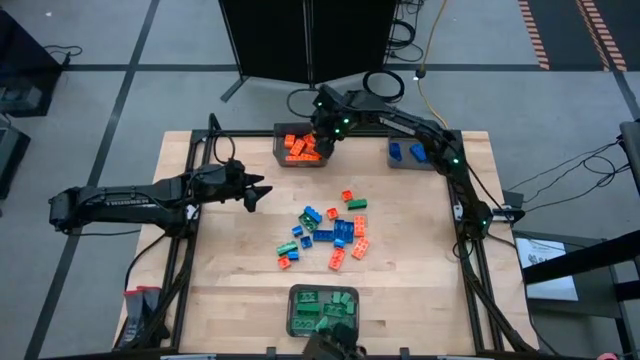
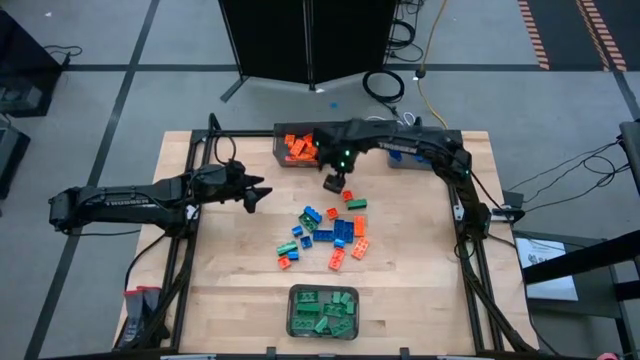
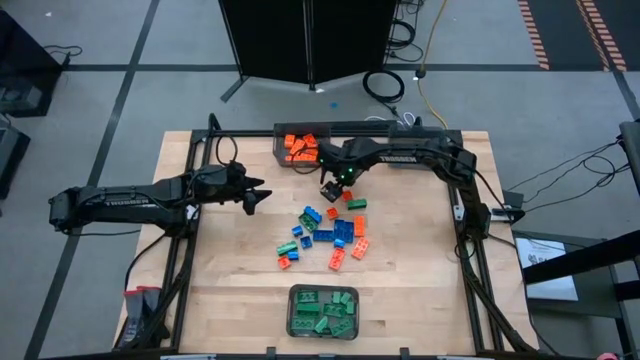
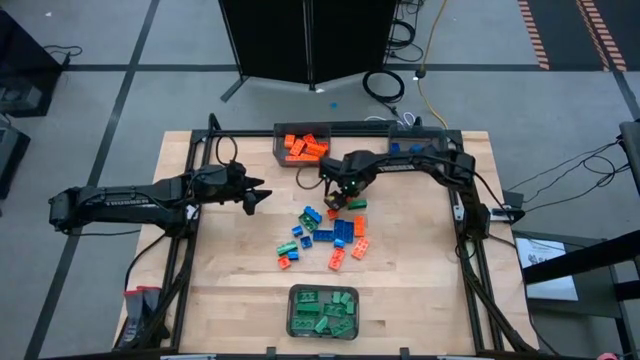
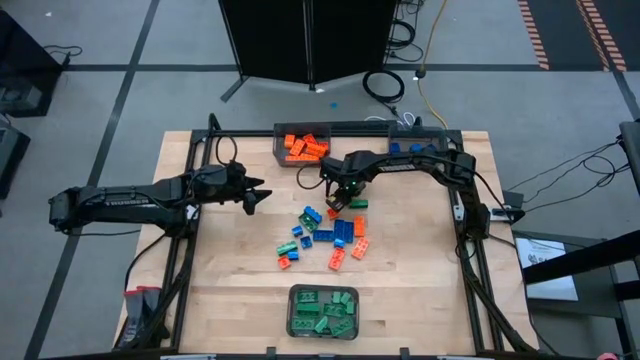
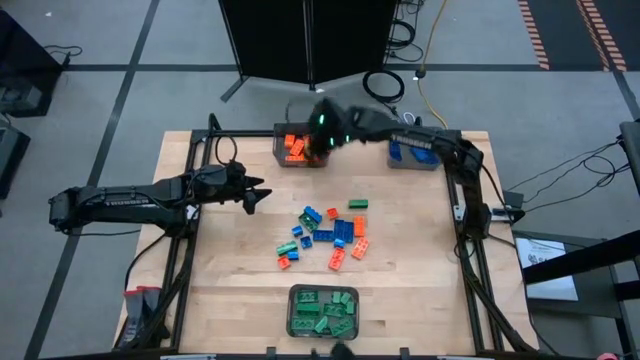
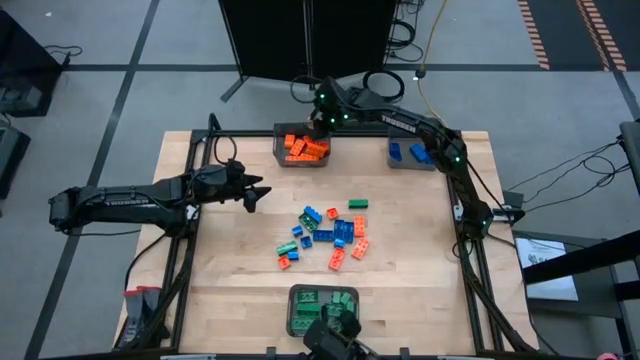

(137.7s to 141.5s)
Task: Sort blocks
Put the orange game piece into the top left black bin

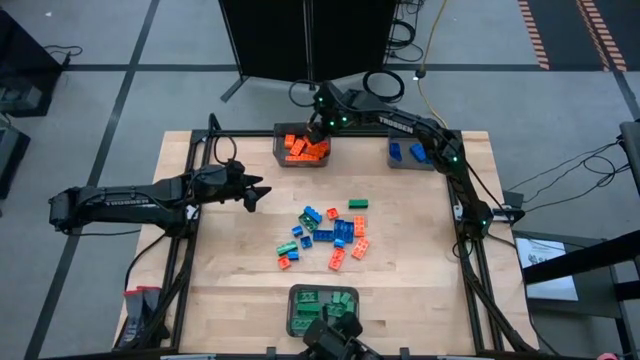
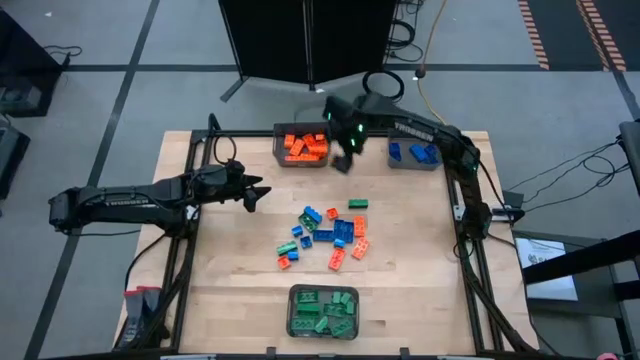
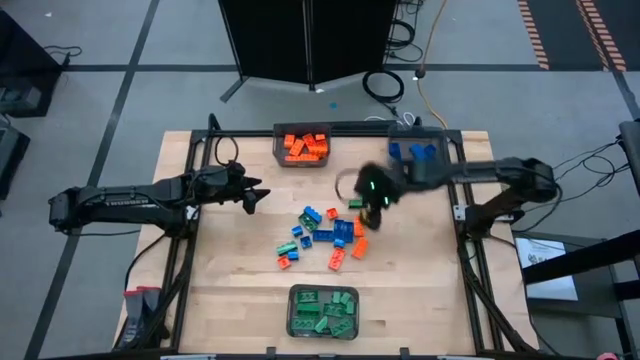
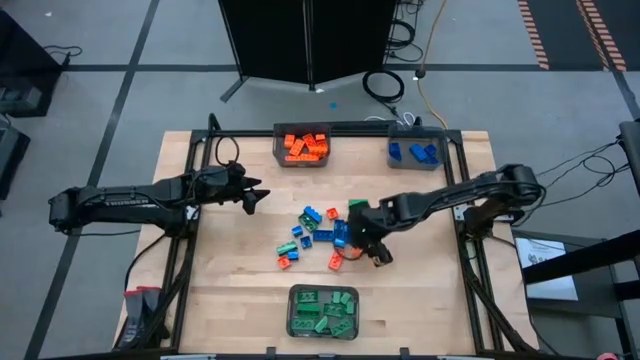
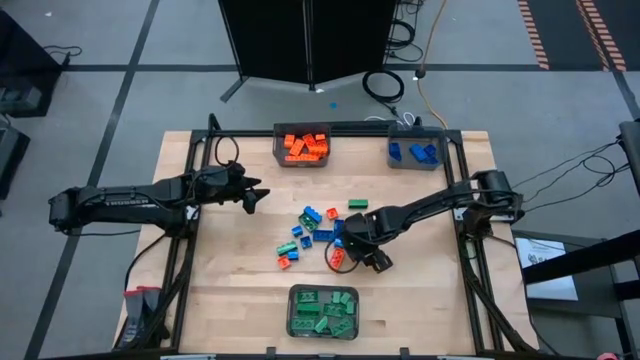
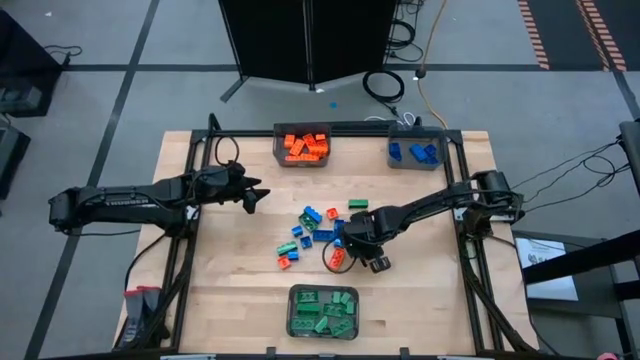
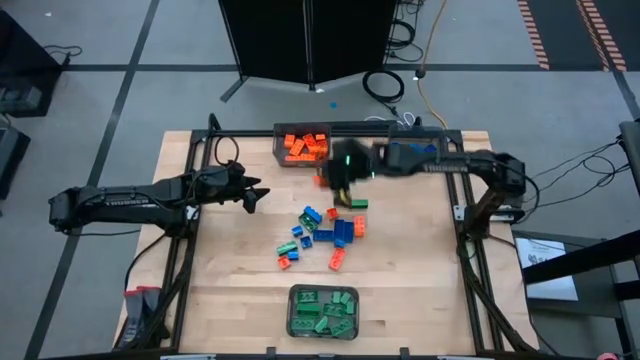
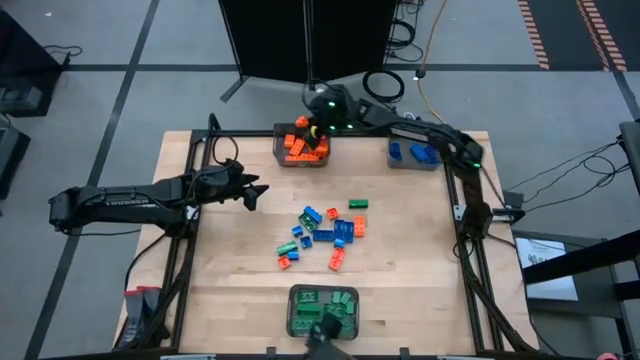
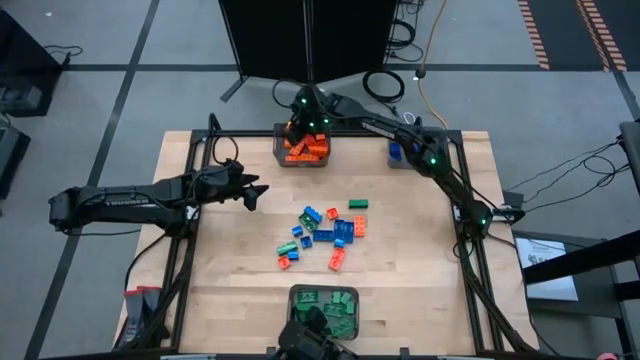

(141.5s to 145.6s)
Put the orange game piece into the top left black bin

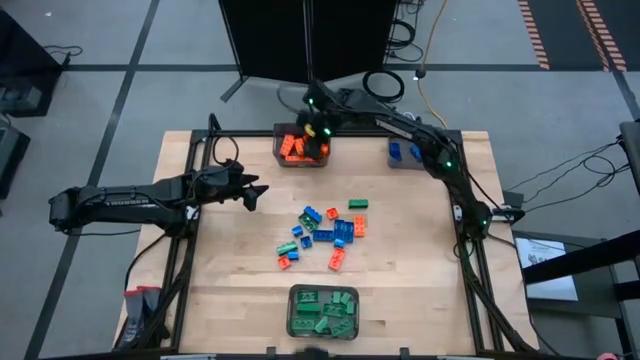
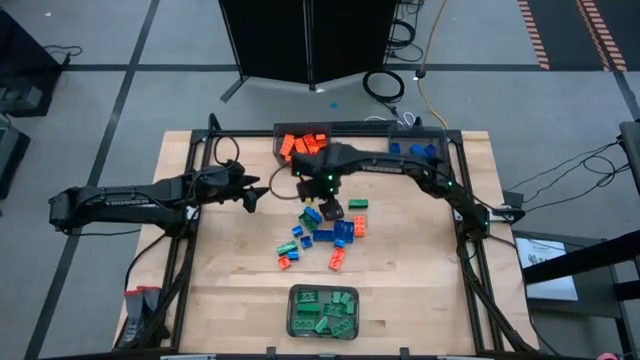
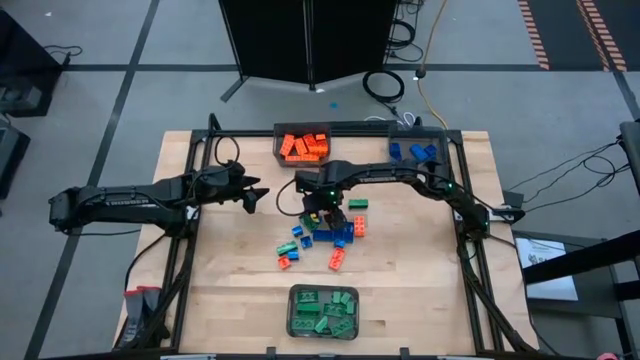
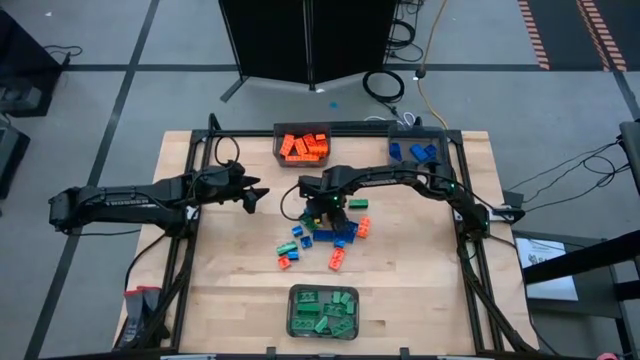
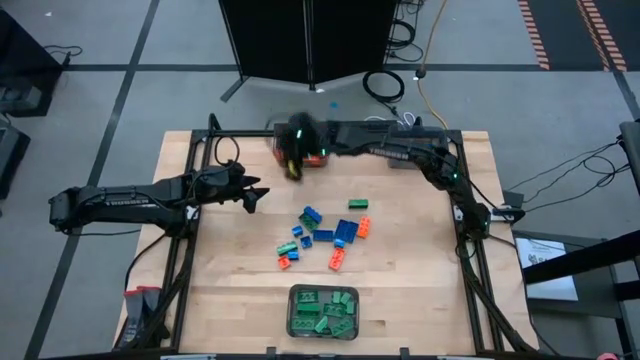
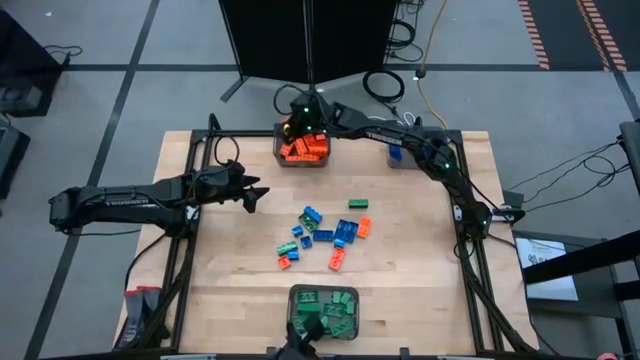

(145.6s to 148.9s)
Put the orange game piece into the top left black bin

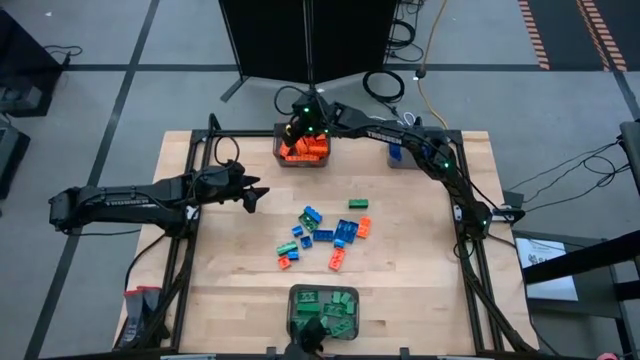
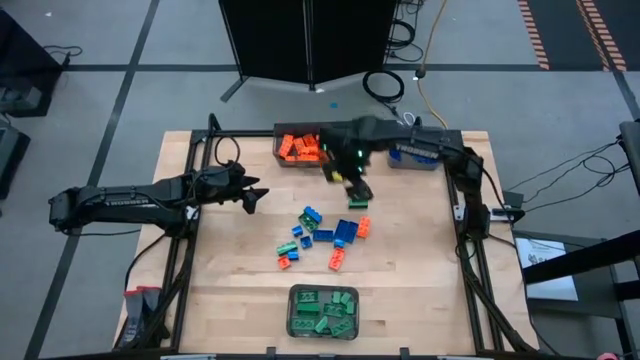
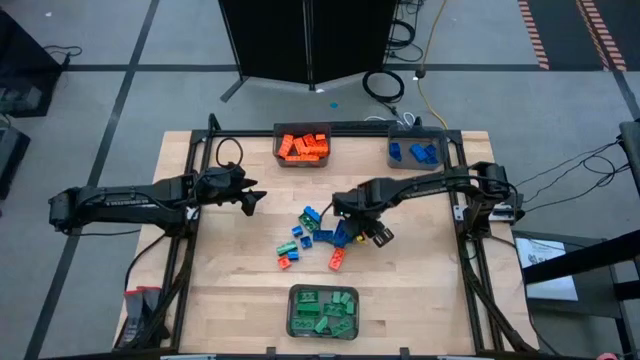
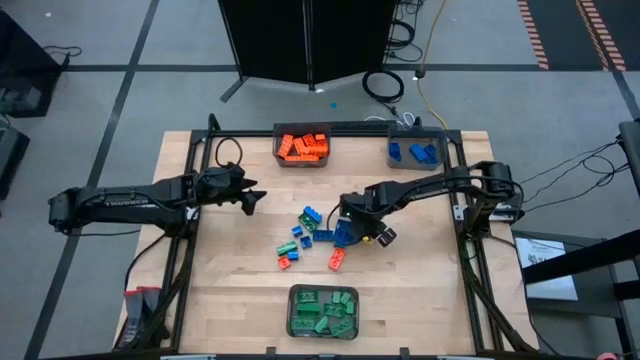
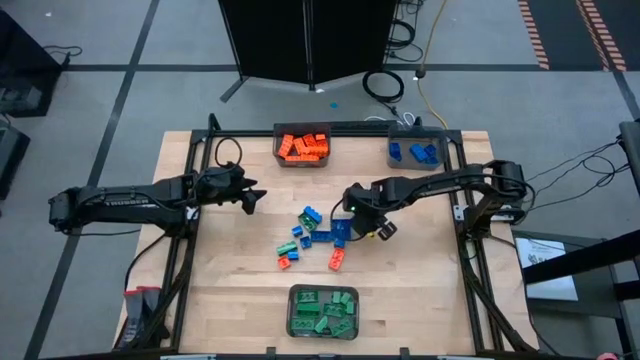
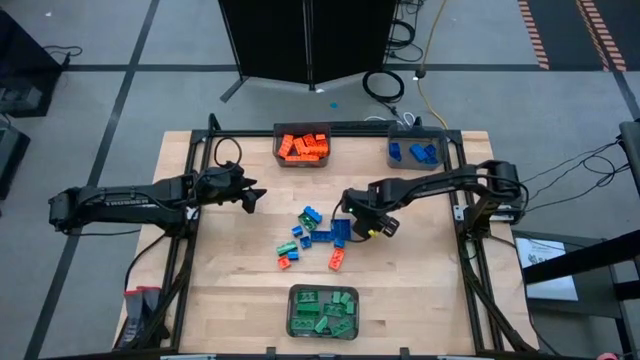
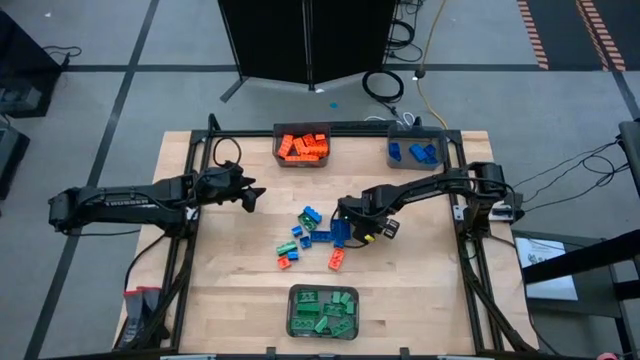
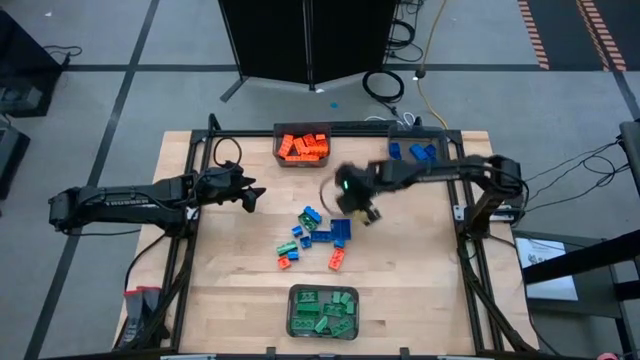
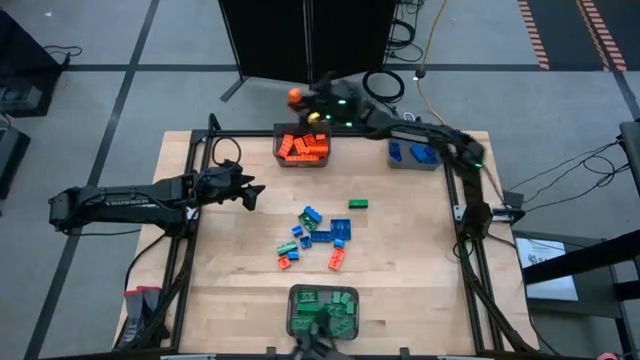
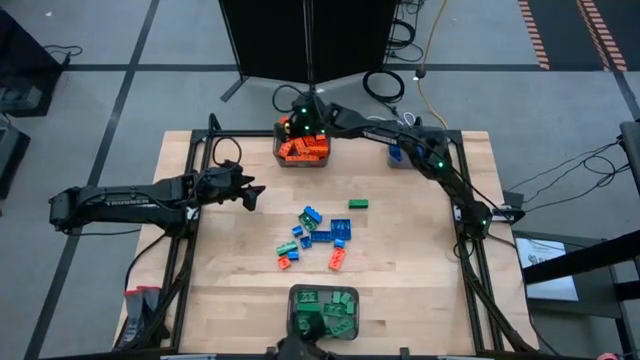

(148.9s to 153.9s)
Put the orange game piece into the top left black bin

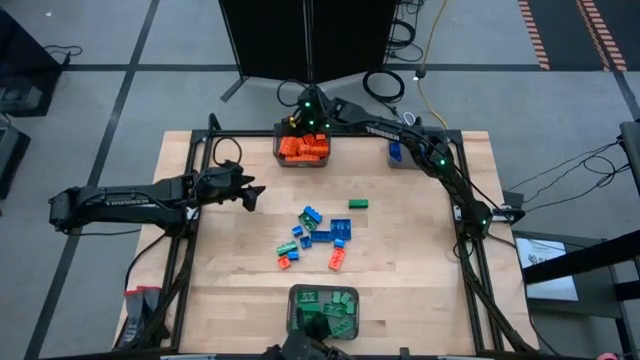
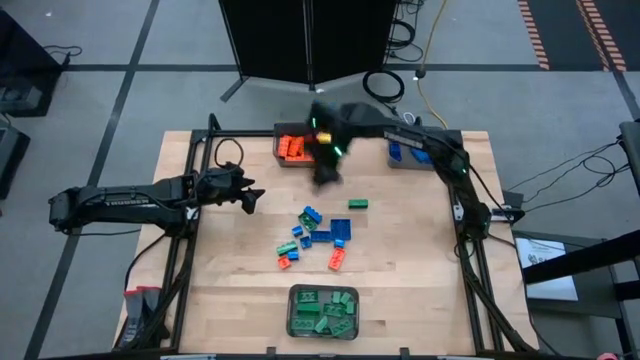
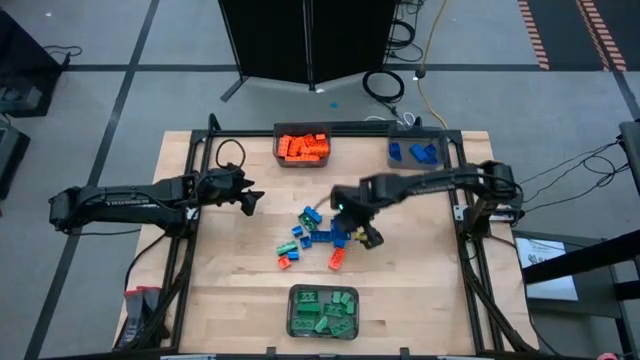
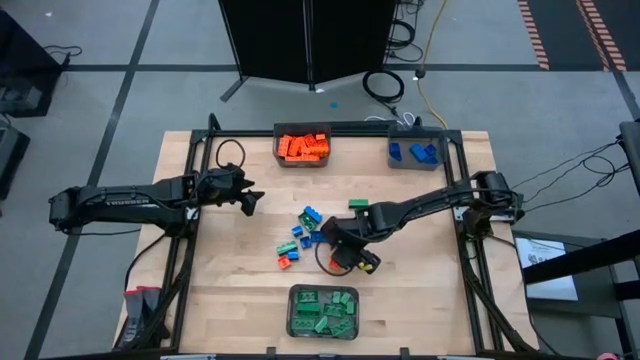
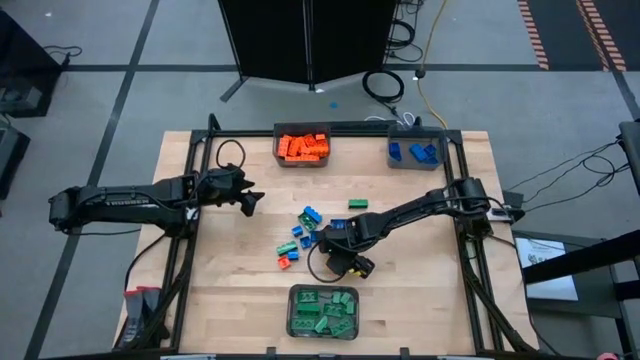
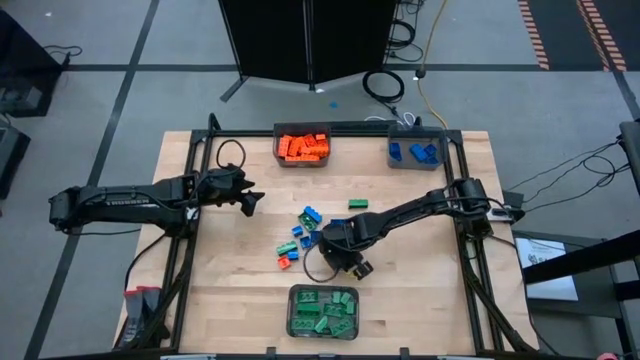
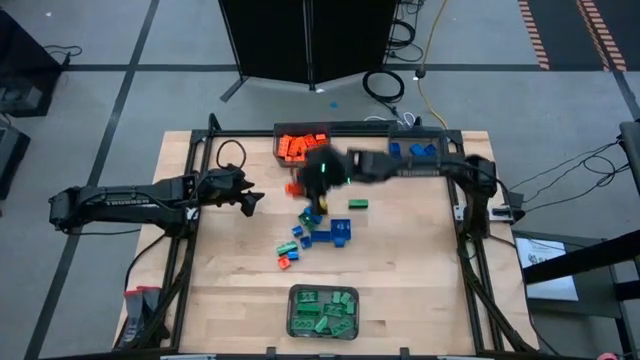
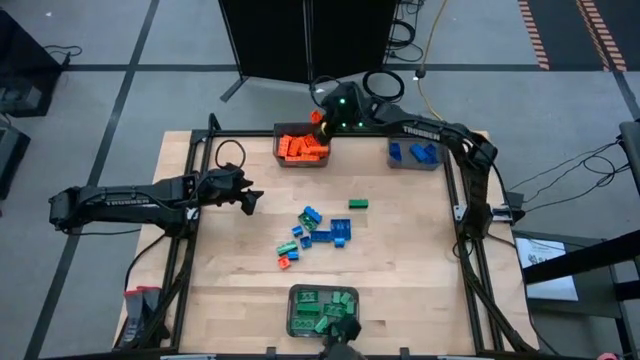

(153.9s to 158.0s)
Put the orange game piece into the top left black bin
